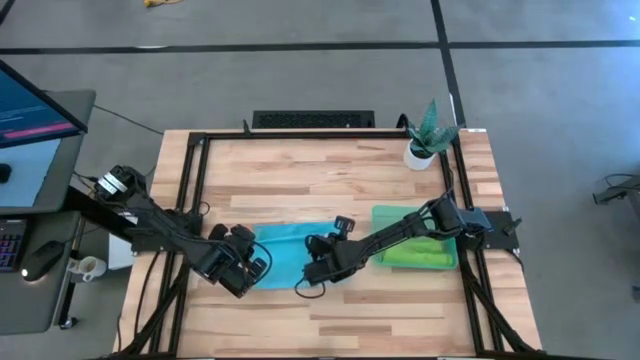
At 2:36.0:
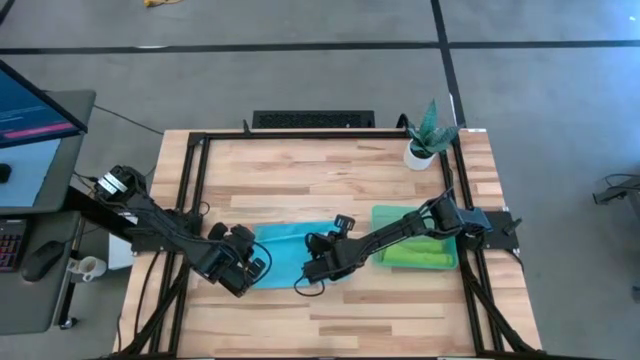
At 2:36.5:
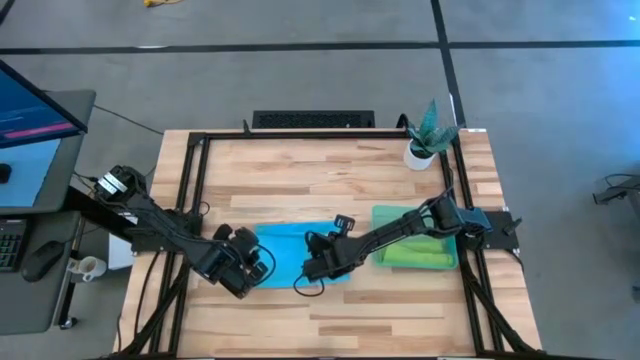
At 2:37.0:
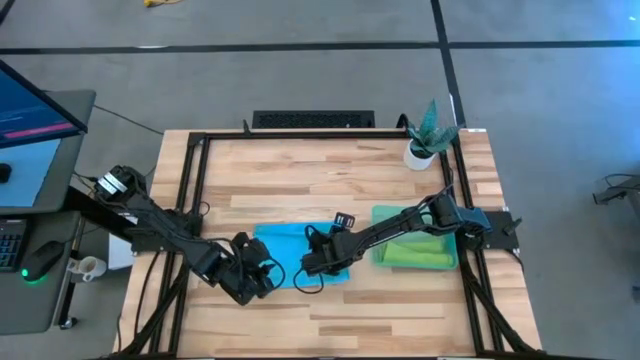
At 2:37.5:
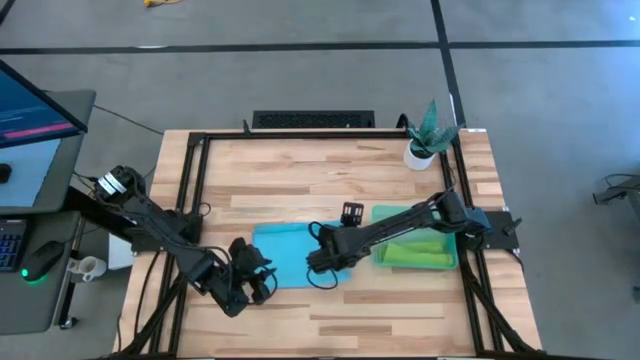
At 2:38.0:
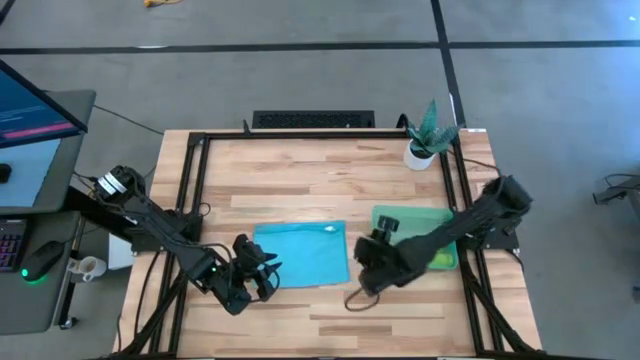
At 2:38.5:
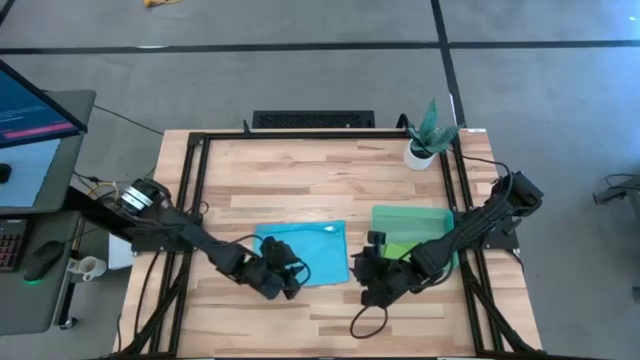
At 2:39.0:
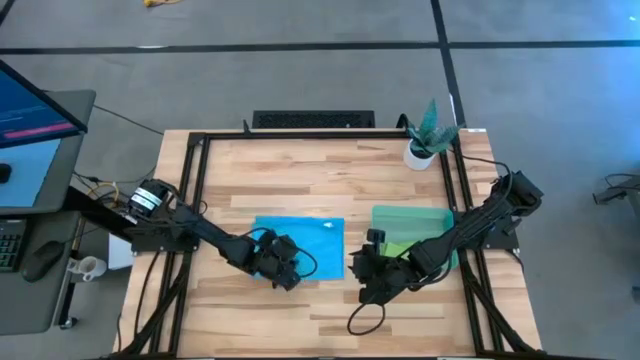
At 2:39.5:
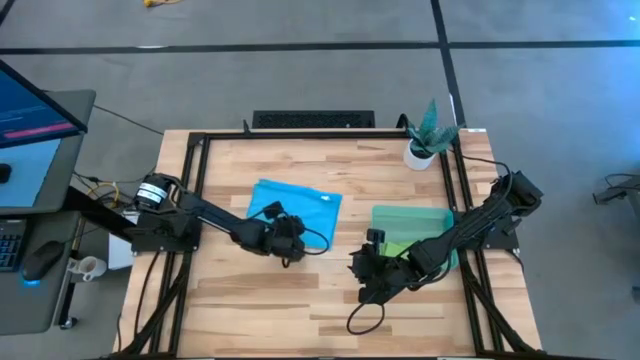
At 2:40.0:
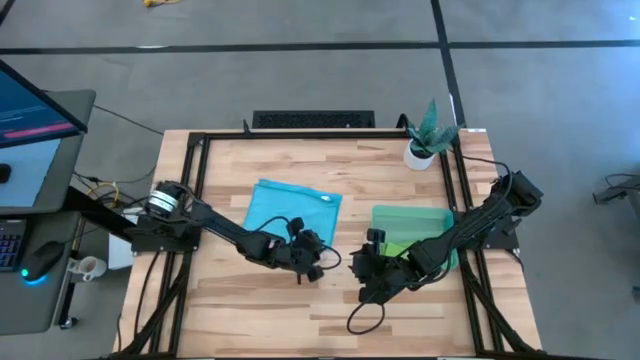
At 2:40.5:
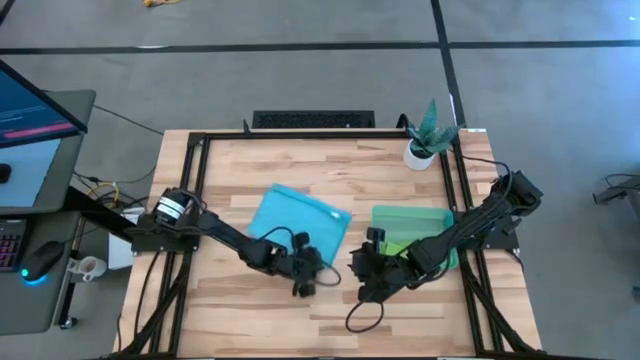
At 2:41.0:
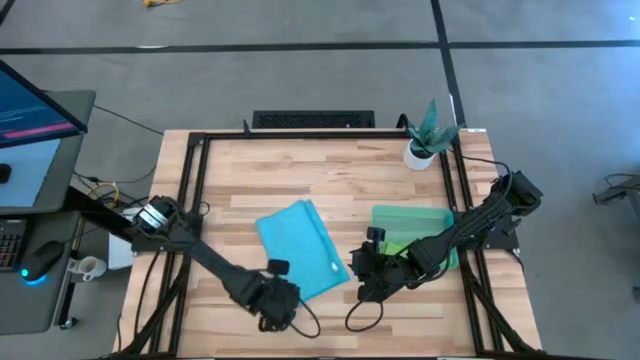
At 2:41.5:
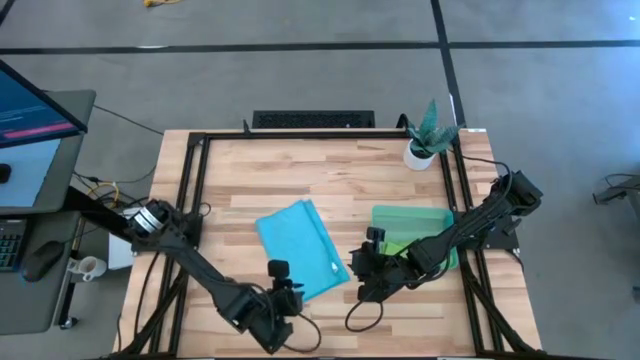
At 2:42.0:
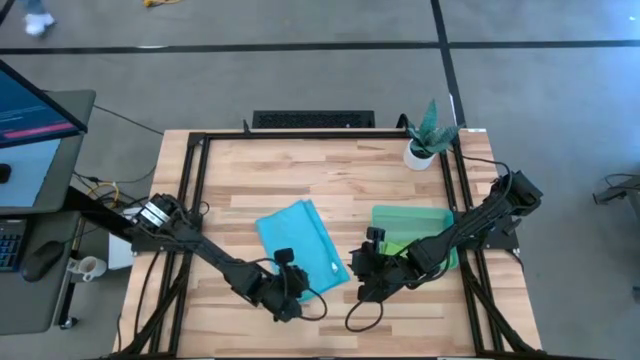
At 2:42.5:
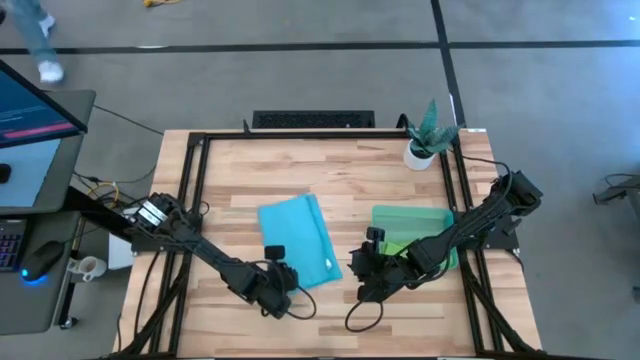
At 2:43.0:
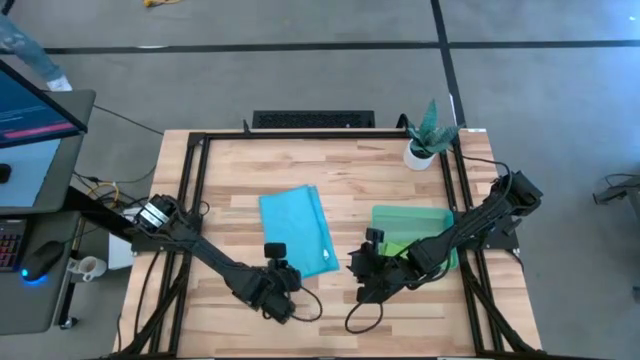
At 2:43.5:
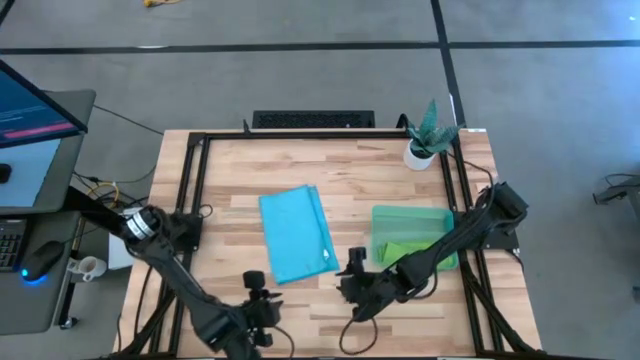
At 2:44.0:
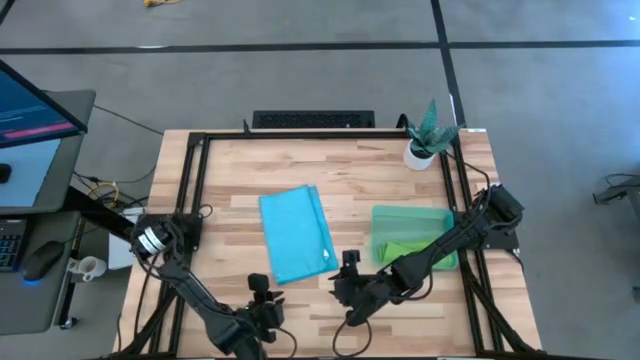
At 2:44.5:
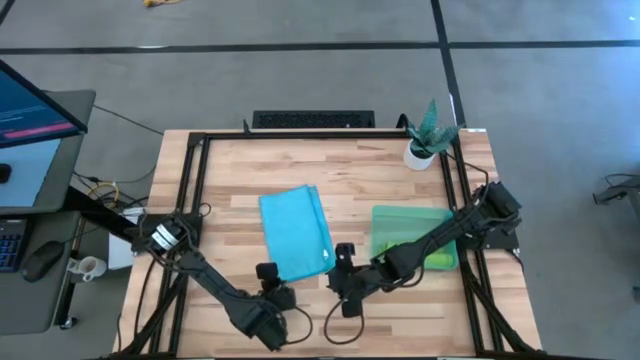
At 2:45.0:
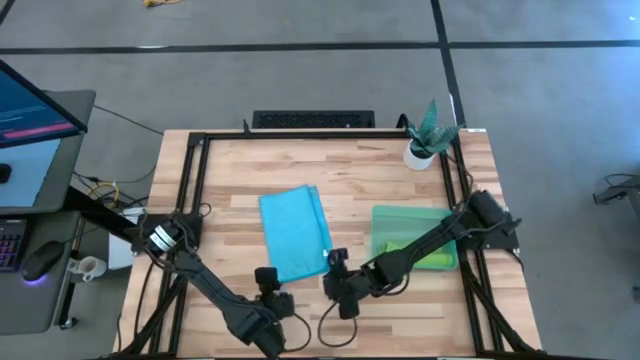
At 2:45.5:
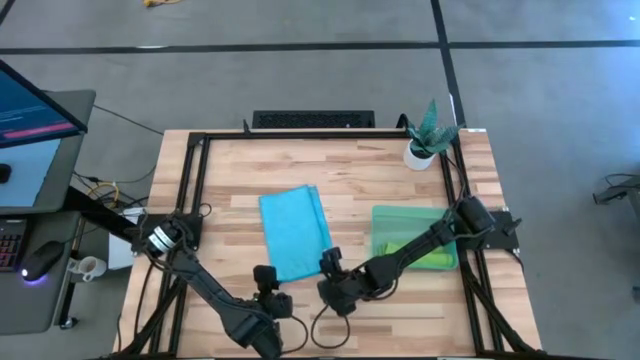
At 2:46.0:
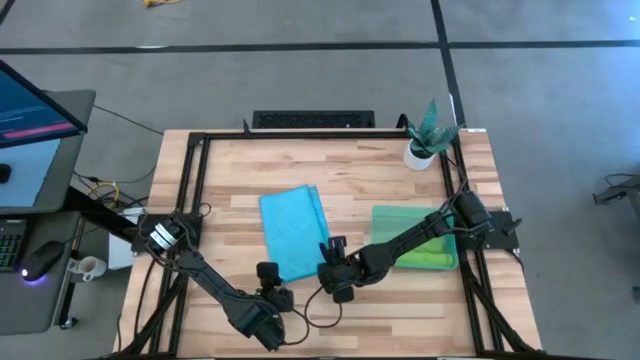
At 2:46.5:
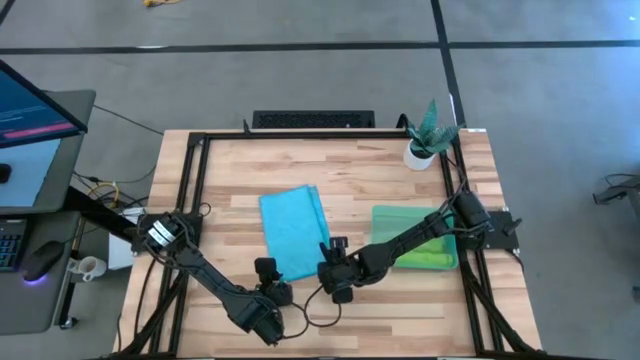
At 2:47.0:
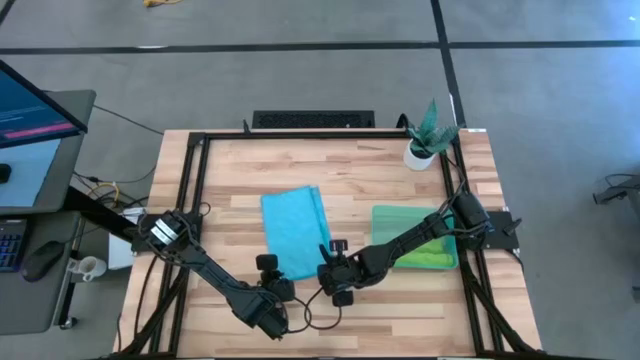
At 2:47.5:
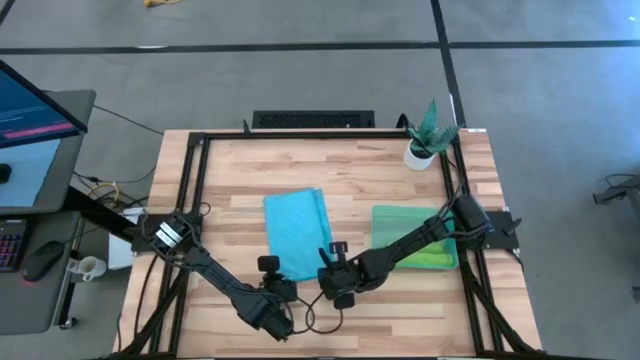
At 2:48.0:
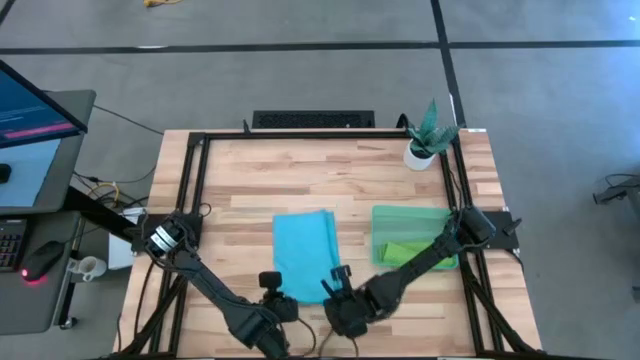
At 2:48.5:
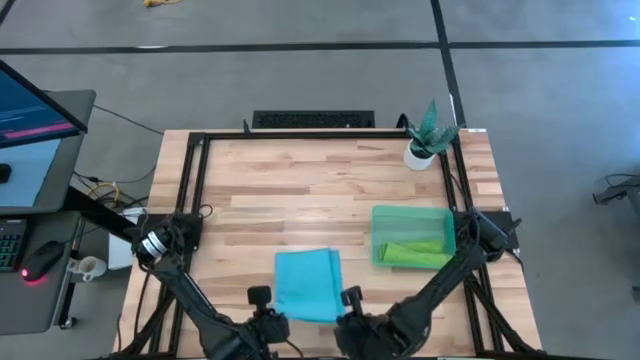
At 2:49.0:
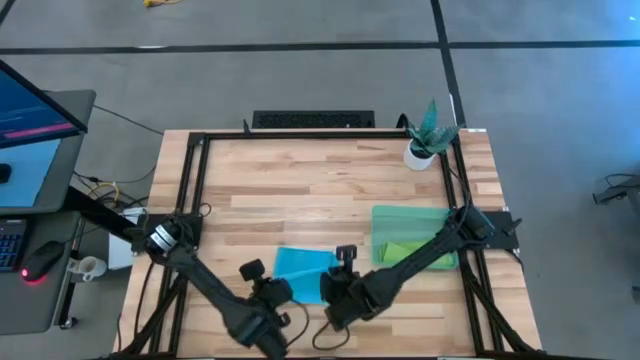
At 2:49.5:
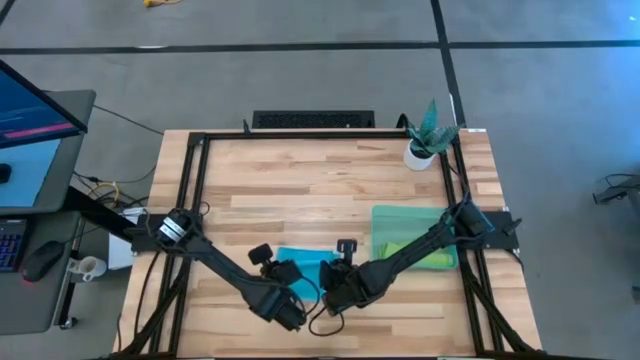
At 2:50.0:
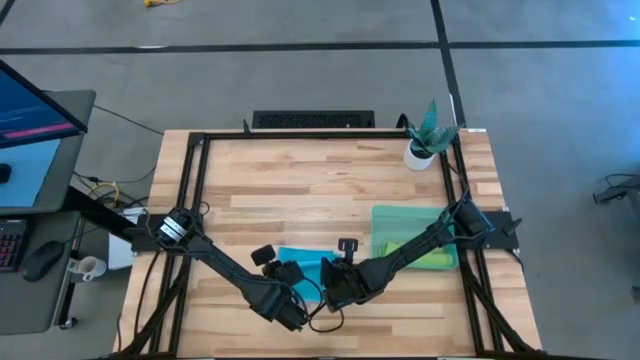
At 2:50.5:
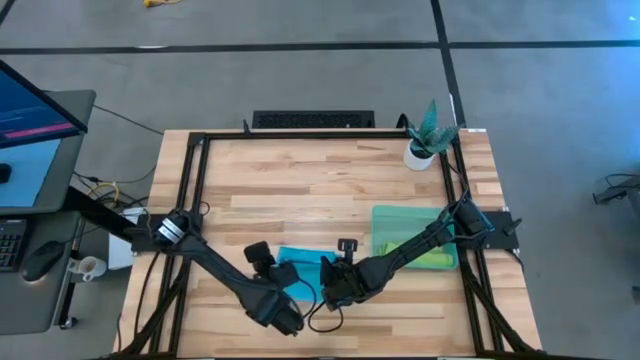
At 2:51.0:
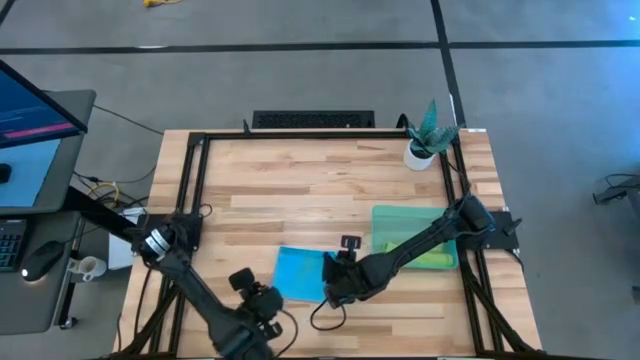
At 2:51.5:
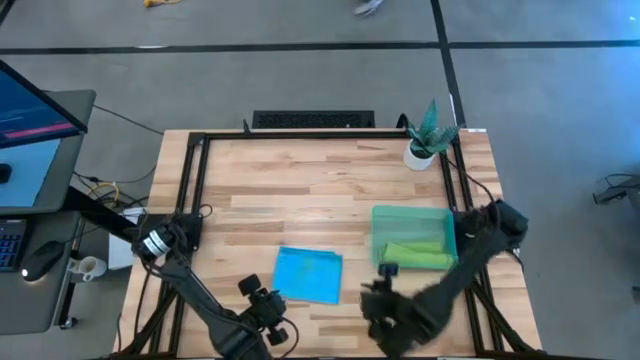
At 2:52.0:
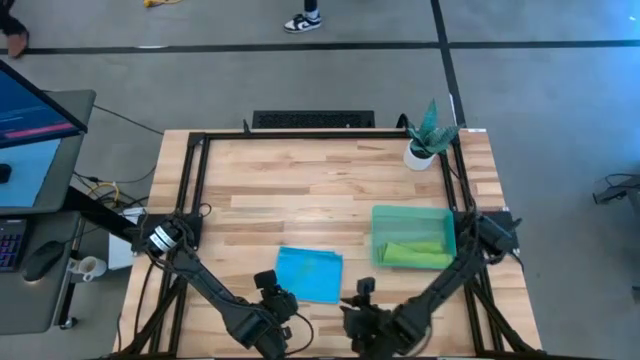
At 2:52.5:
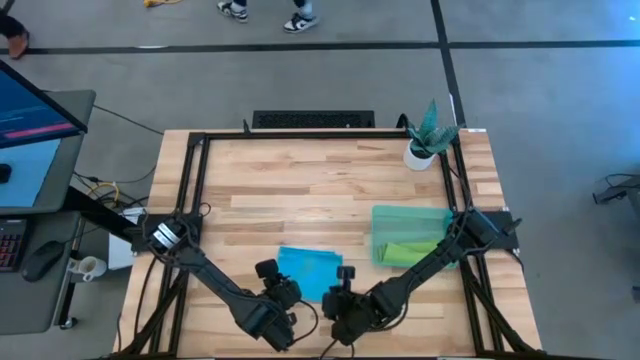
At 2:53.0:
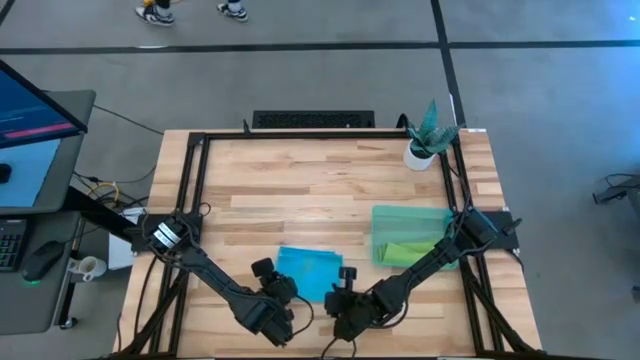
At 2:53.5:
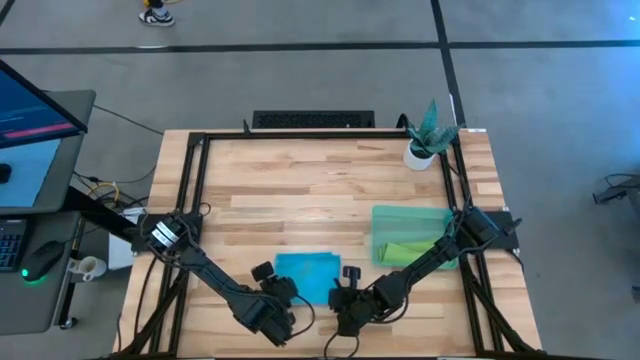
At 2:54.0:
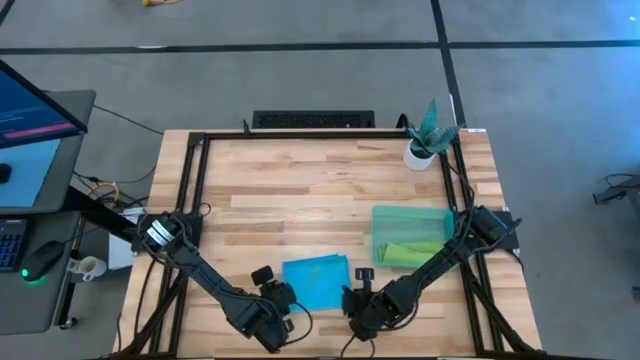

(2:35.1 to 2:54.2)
Task: Roll microfiber towels into tight, uniform cylinder then place into a basket
Fold the blue towel

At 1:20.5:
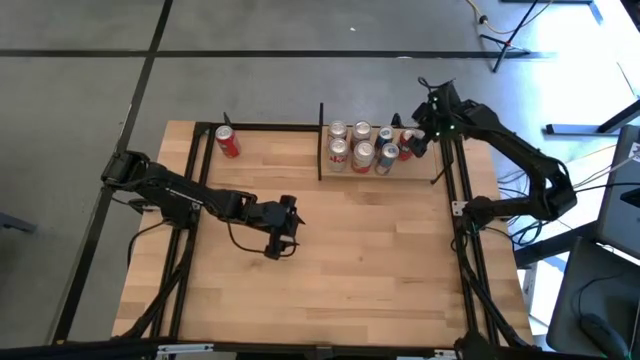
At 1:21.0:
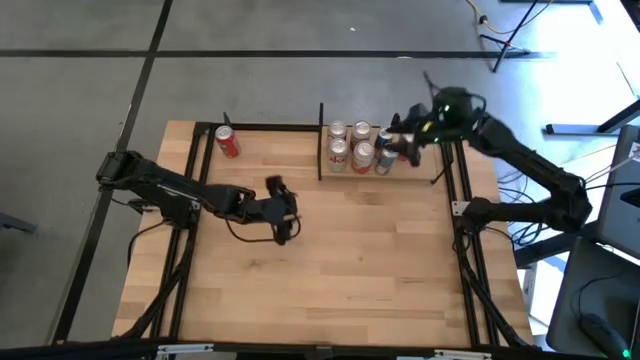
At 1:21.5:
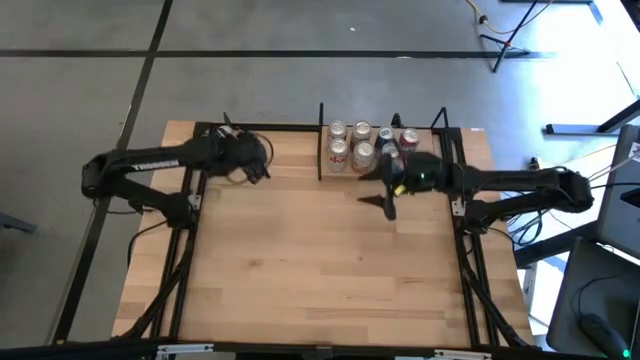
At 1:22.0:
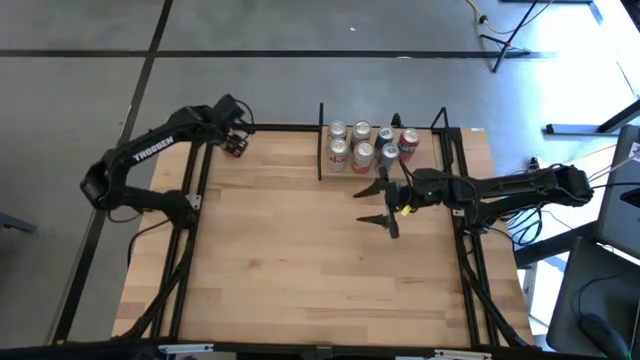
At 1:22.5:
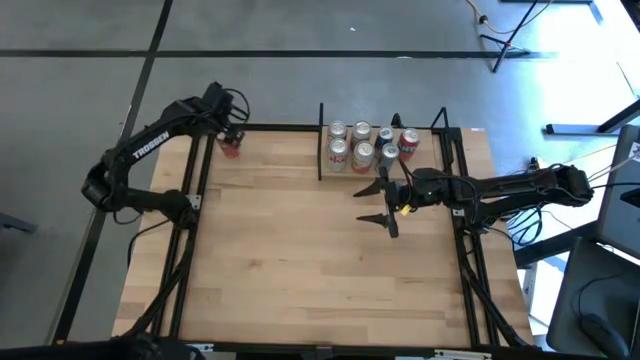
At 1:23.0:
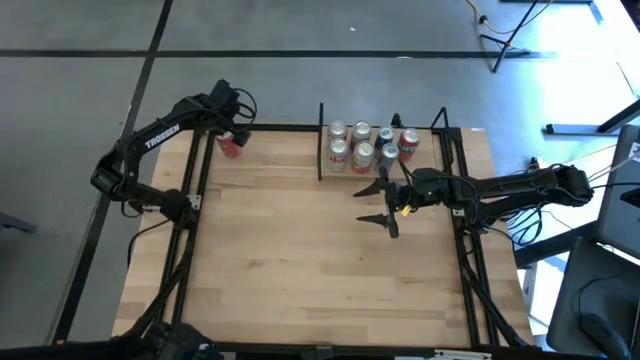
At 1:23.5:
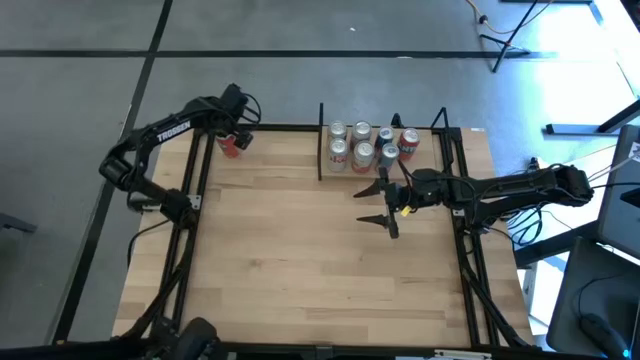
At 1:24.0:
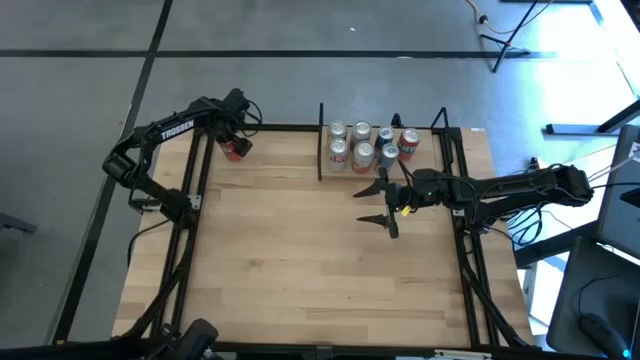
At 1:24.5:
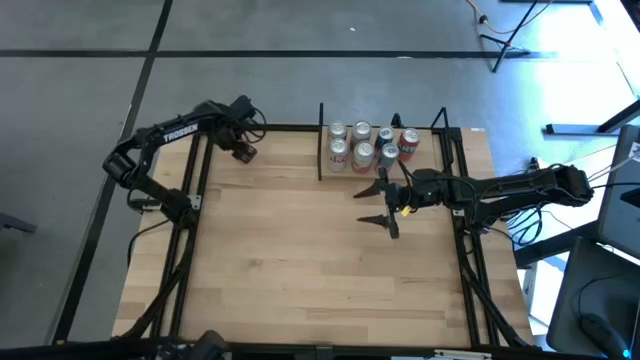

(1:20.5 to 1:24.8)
Task: Place canned beverage on shelf
Put the red soda can on the shelf aligned with the other red soda can
